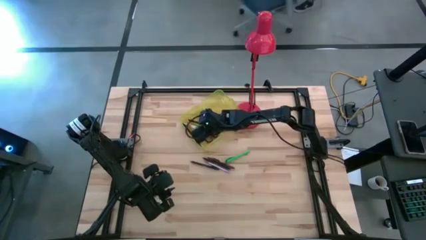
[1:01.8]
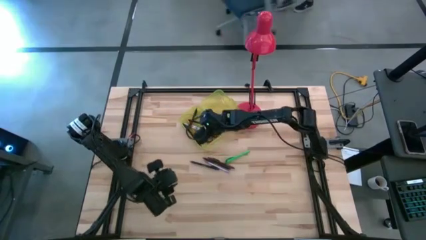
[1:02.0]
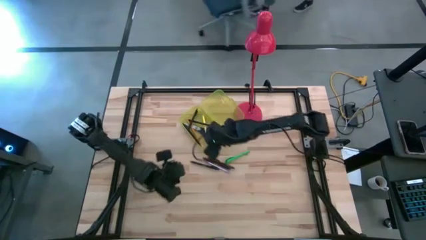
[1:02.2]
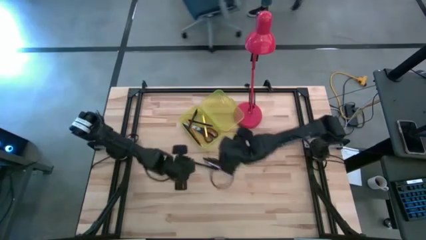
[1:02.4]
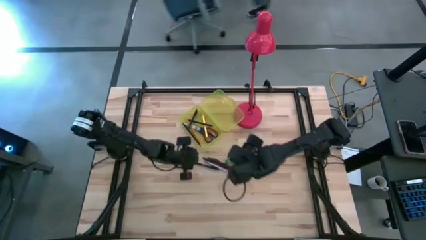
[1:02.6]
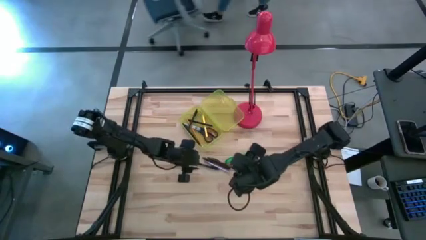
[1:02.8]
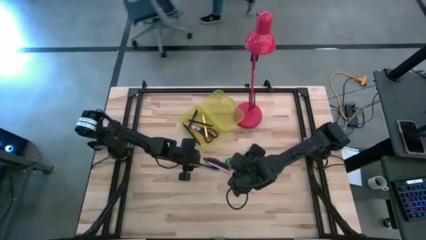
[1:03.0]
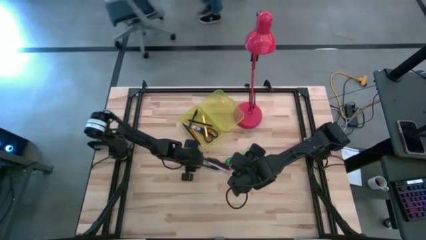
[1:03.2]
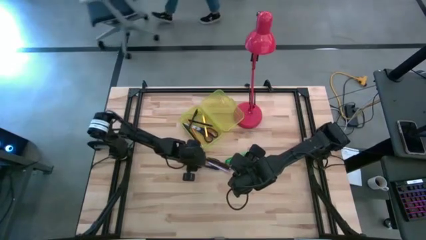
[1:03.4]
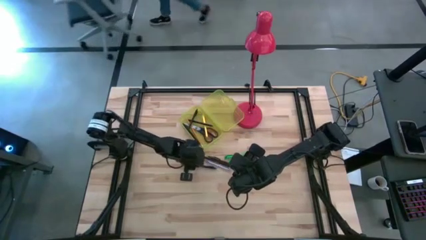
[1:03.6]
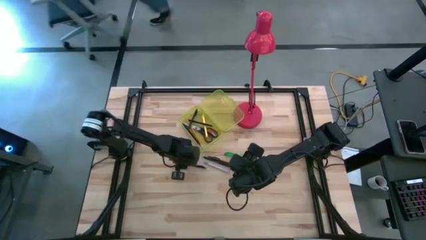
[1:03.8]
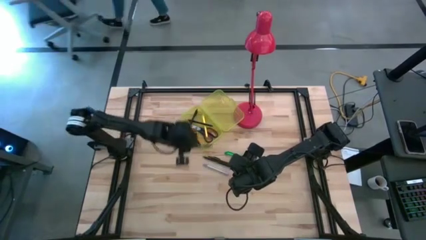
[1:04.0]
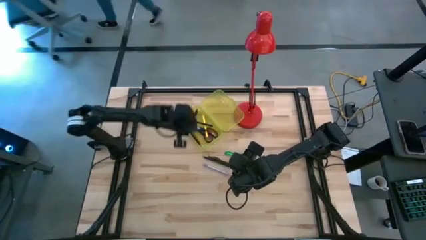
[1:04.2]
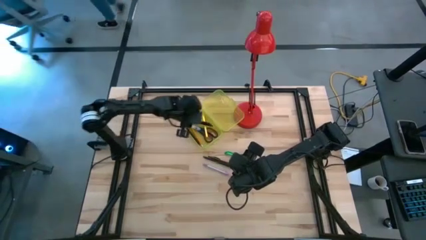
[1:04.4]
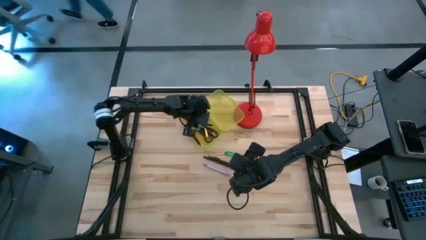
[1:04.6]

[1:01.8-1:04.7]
Task: Pick & place school supplies into a supply box
Put the black pen into the yellow supply box

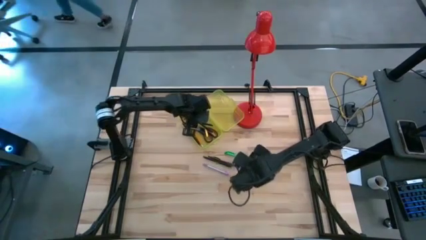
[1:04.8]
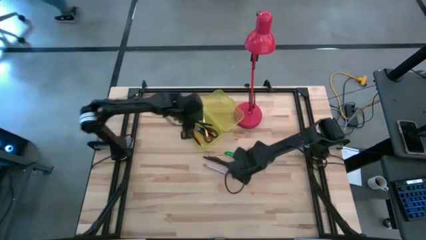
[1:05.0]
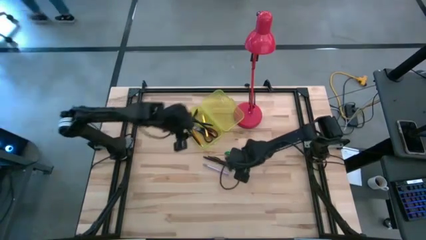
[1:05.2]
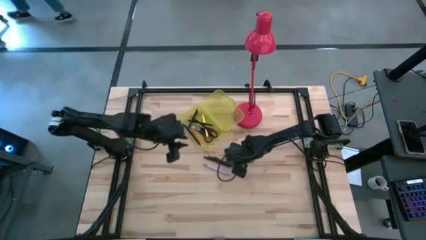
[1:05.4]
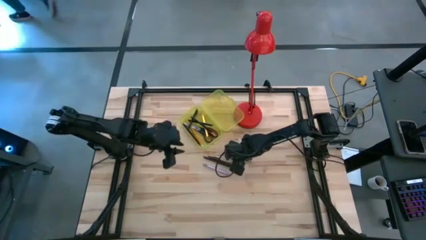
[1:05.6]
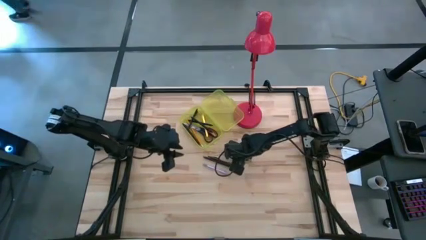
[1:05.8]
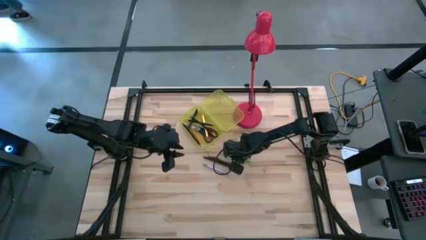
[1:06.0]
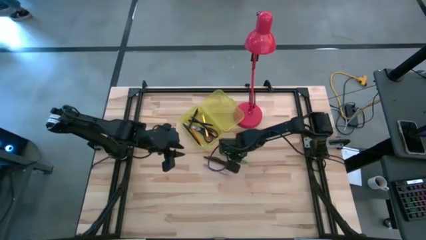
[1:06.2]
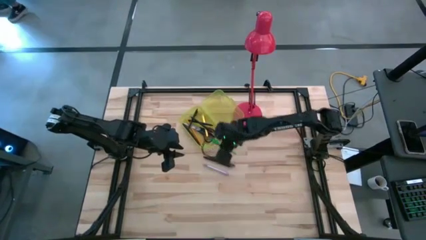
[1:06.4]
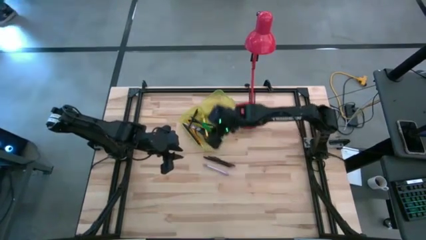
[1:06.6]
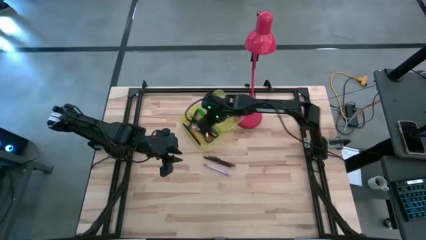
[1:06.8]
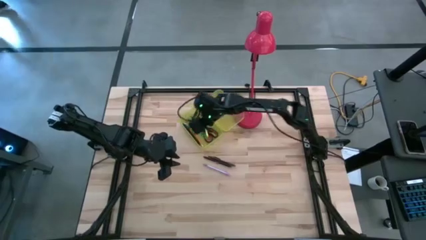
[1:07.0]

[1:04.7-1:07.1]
Put the green pen into the yellow supply box

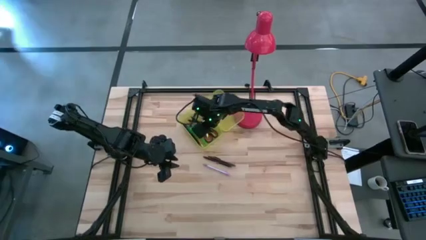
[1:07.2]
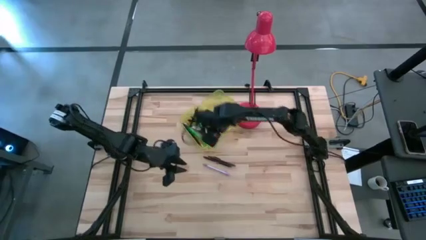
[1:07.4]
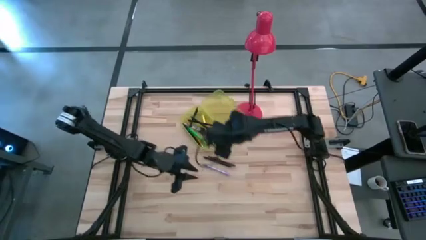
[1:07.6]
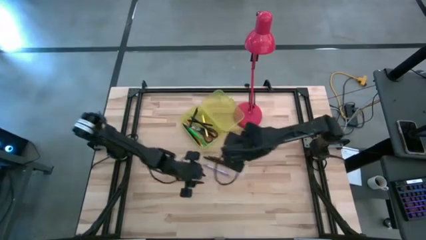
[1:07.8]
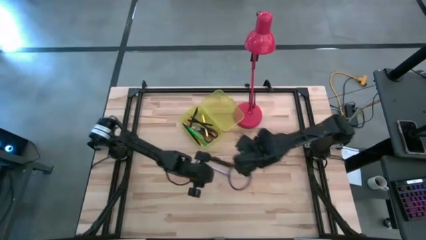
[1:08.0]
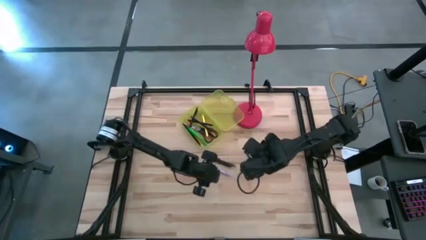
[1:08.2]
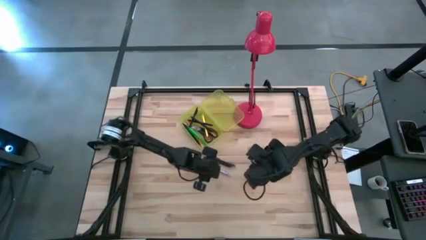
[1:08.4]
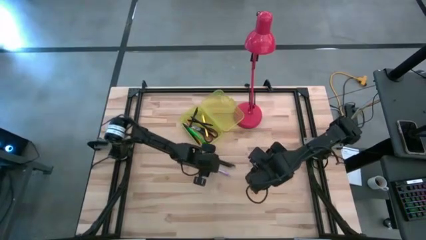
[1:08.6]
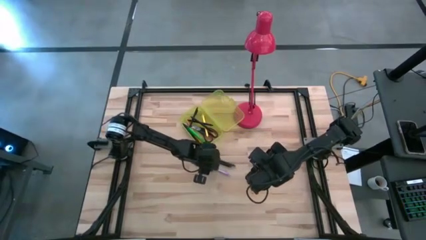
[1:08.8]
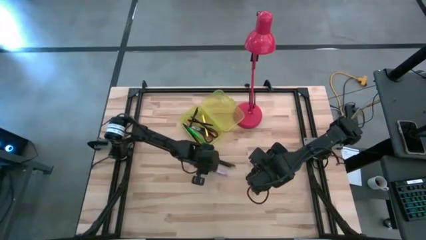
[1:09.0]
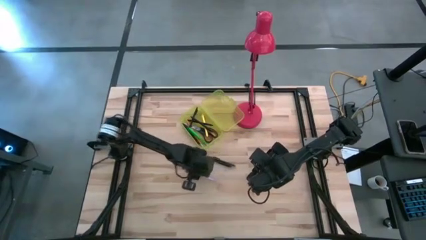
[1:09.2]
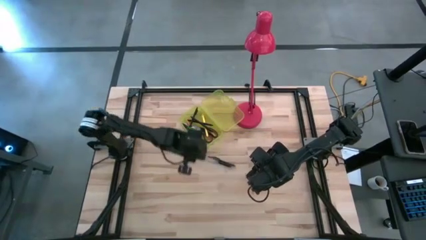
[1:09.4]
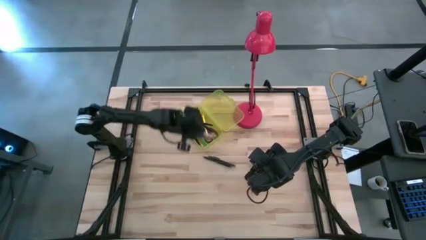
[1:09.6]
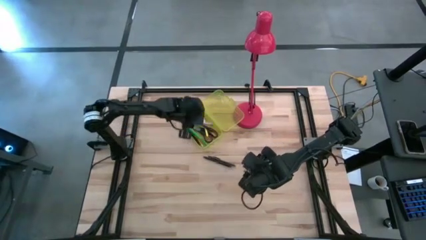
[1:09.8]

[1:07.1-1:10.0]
Put the violet pen into the yellow supply box

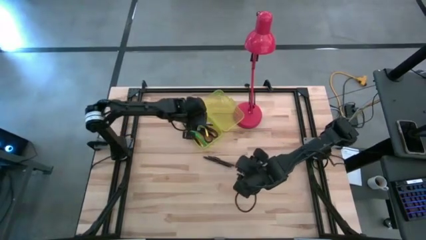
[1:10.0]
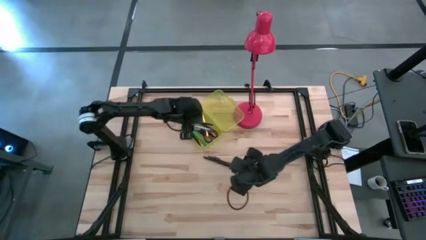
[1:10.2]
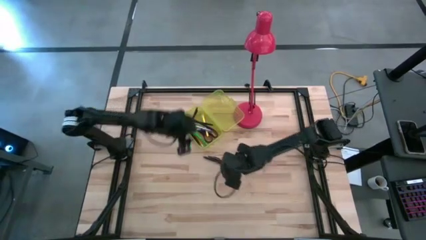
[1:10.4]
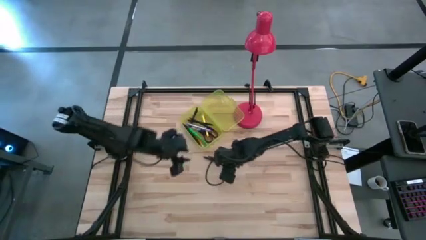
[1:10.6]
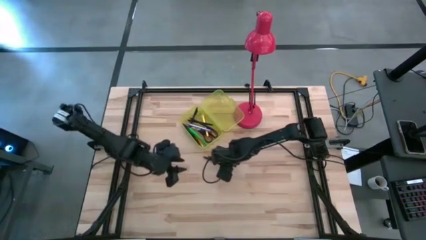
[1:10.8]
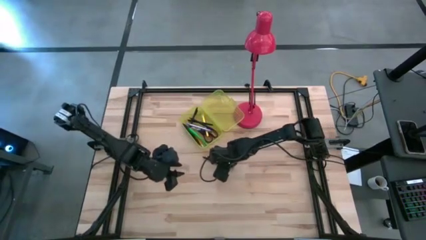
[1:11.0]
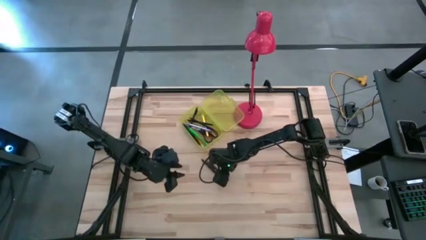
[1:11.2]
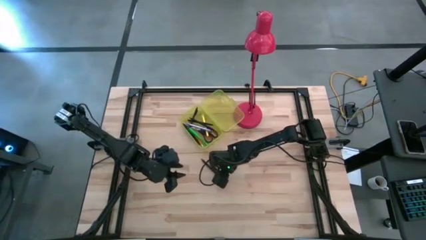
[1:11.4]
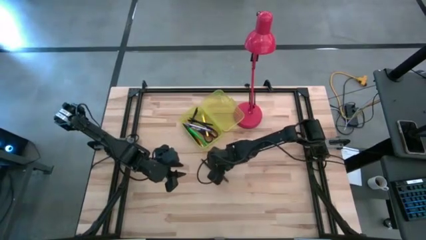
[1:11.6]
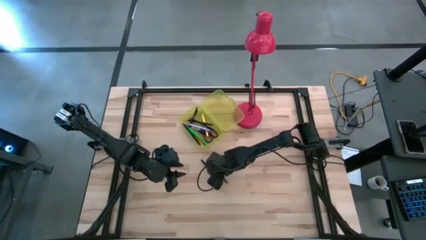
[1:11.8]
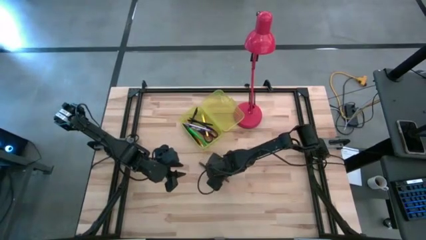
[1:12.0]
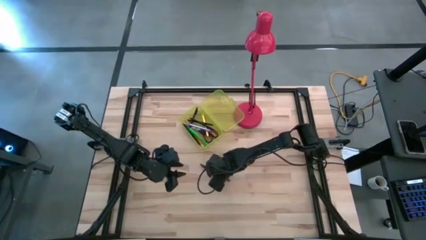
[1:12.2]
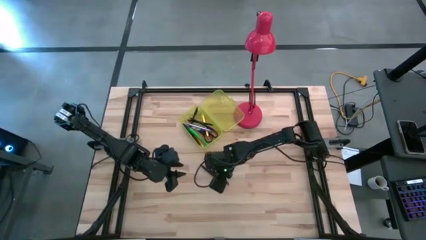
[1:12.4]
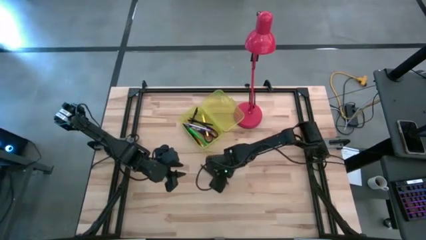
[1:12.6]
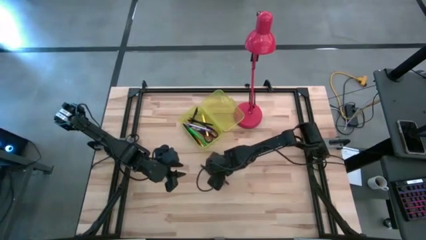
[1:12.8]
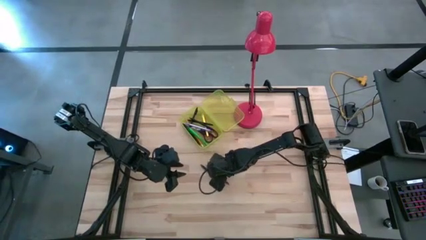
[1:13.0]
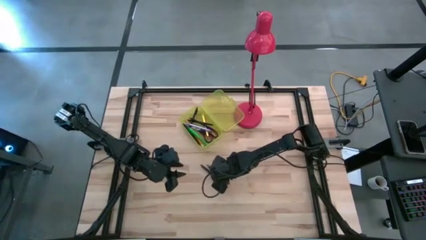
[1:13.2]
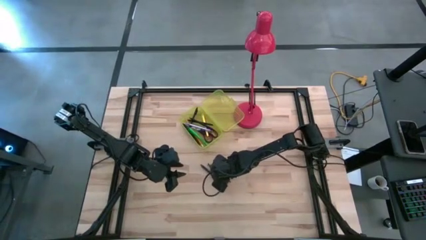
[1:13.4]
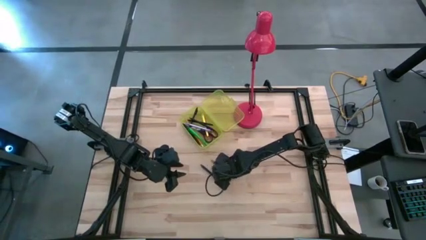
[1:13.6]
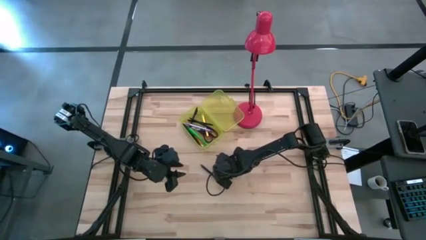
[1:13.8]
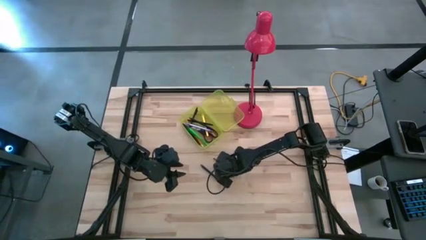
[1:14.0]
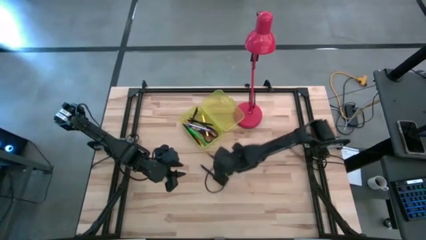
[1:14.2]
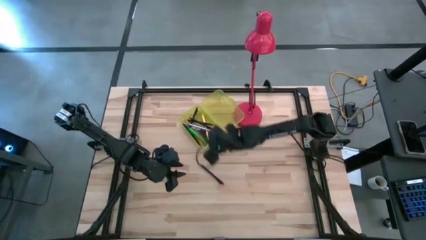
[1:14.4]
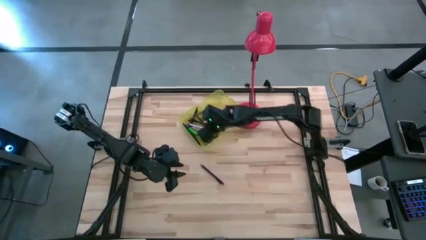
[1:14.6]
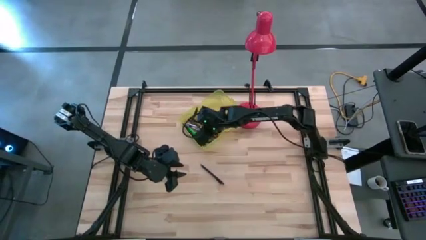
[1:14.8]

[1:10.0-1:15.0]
Put the brown pen into the yellow supply box

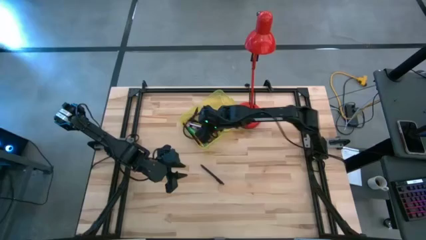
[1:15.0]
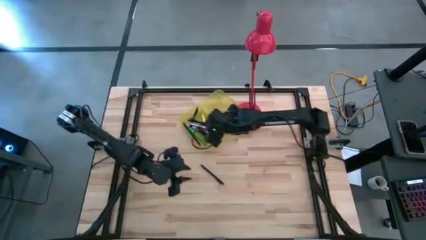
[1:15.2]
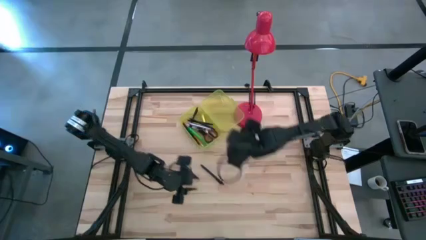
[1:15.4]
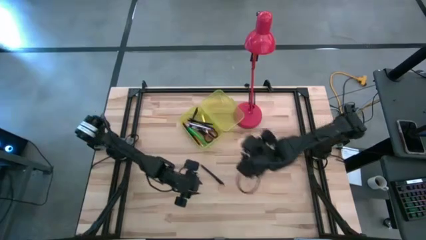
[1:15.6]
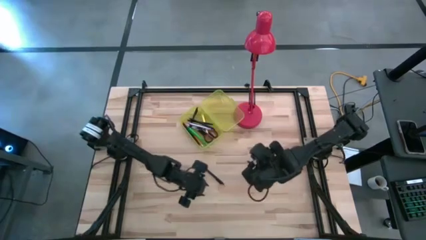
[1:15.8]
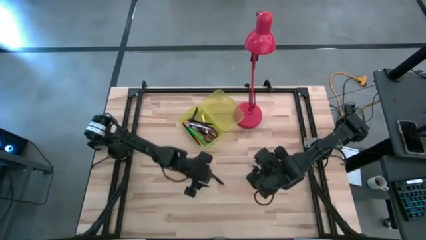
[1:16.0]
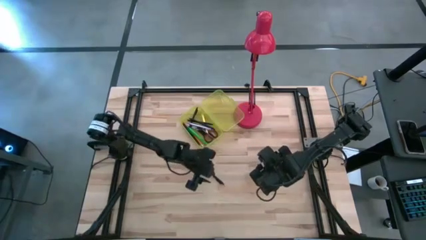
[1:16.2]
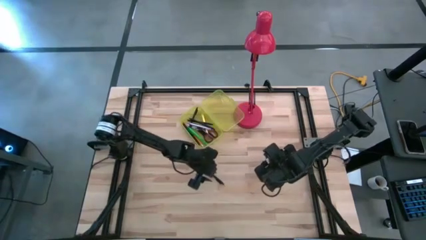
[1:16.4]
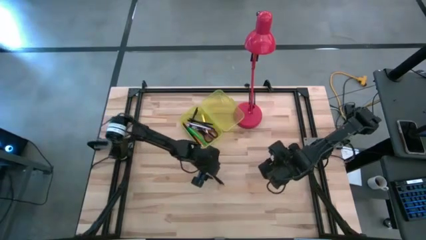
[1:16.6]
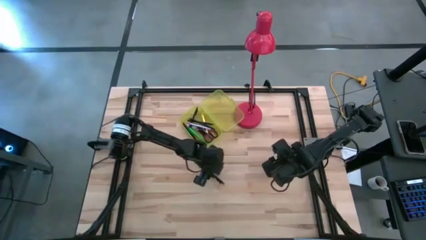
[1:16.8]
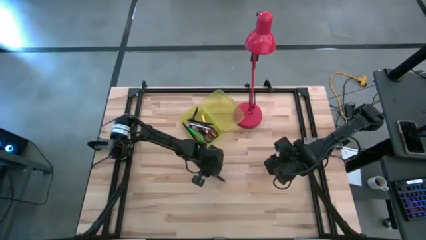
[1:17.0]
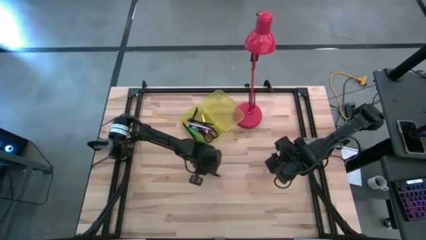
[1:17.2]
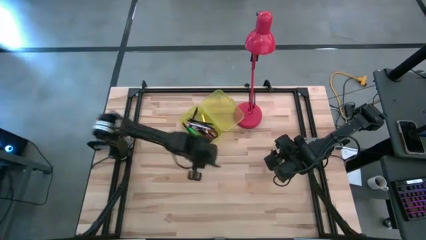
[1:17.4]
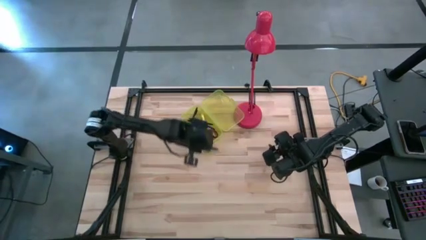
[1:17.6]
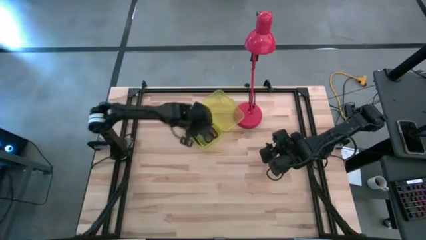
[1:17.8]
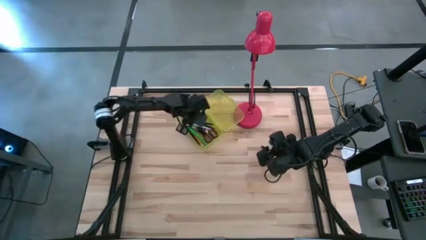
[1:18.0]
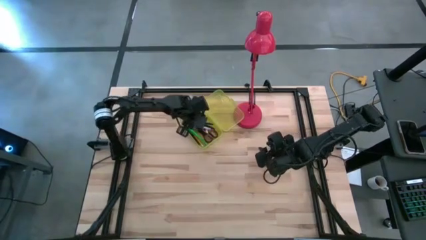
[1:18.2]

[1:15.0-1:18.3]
Put the black pen into the yellow supply box
